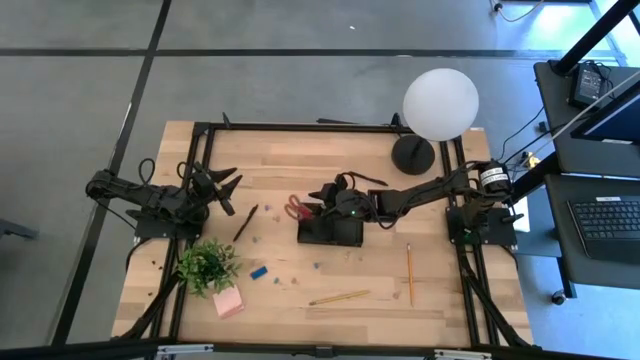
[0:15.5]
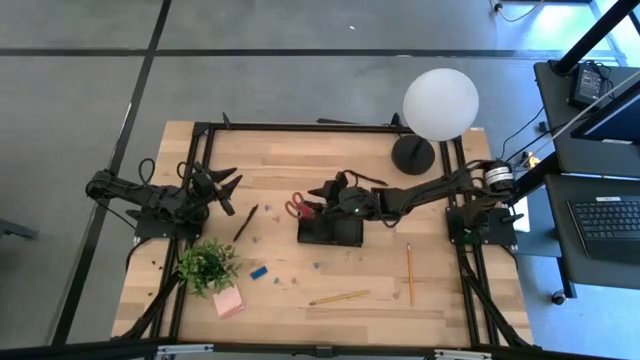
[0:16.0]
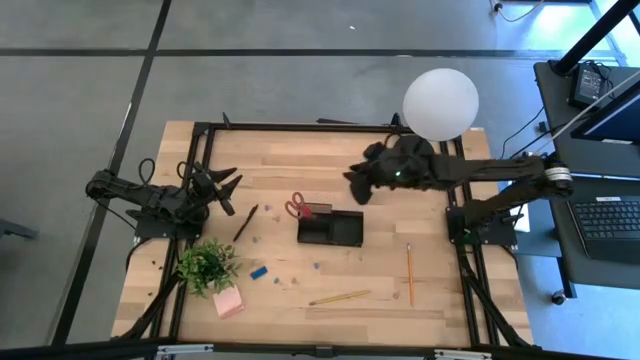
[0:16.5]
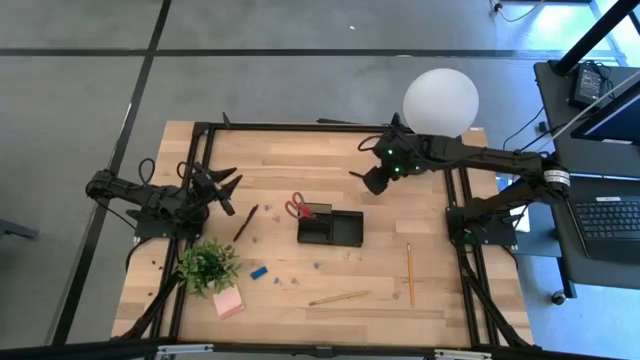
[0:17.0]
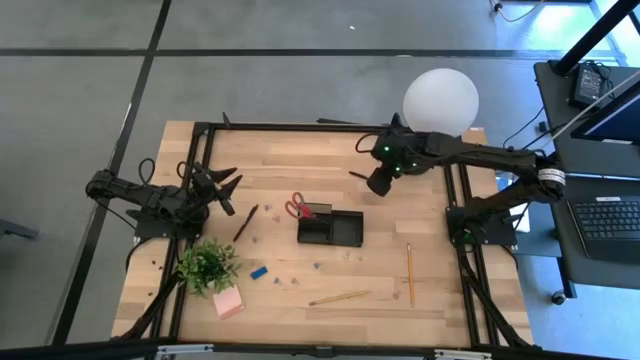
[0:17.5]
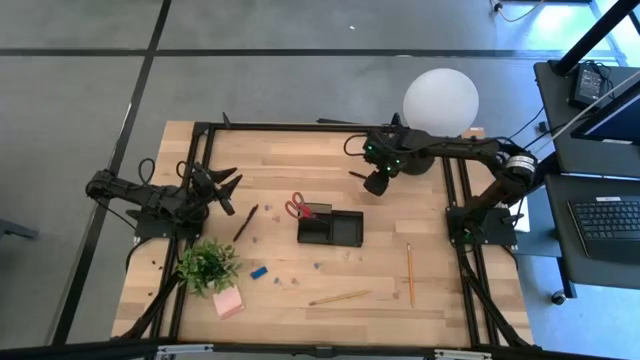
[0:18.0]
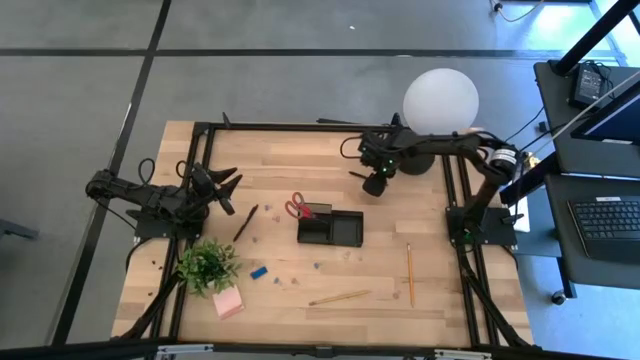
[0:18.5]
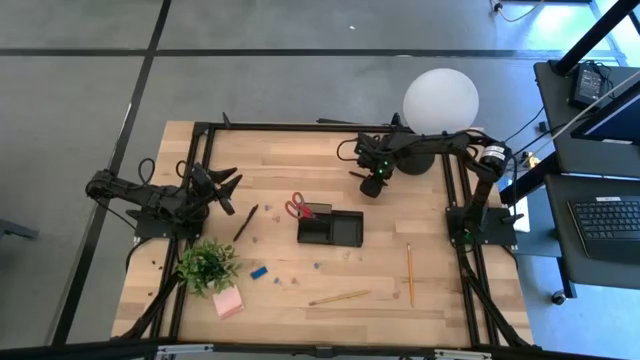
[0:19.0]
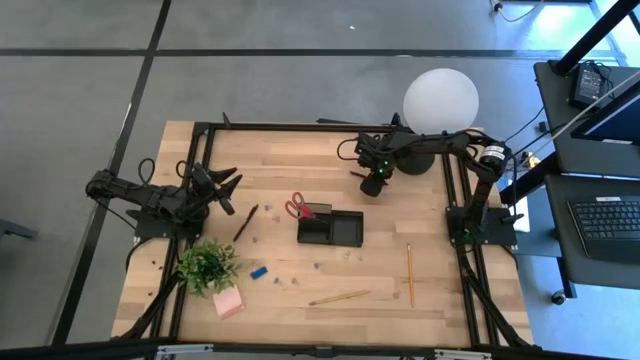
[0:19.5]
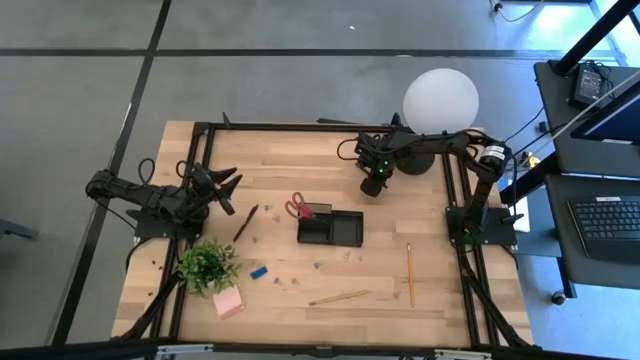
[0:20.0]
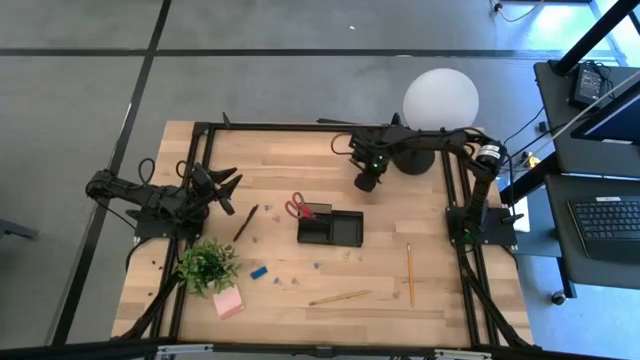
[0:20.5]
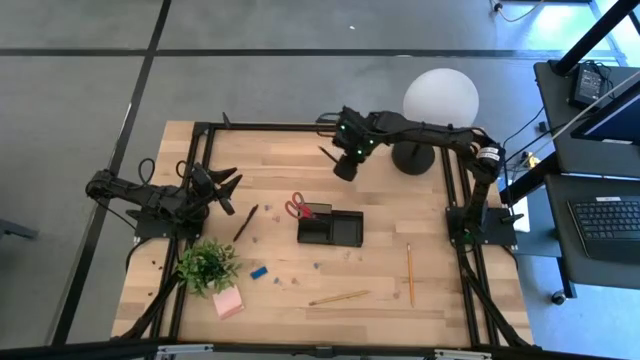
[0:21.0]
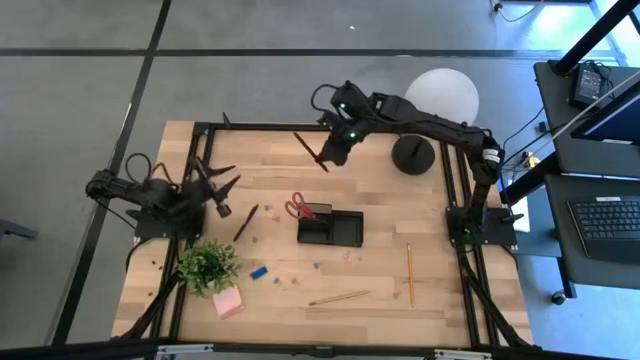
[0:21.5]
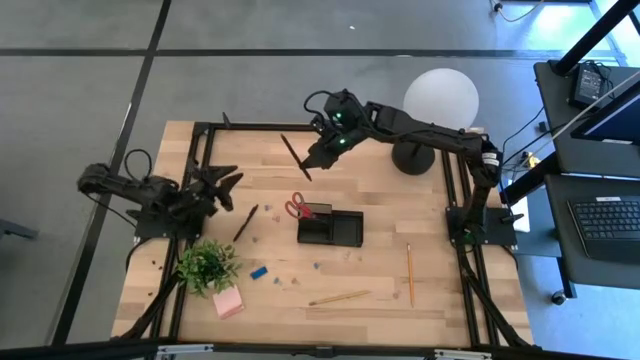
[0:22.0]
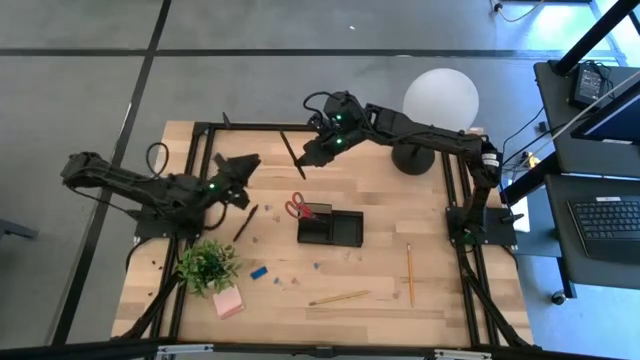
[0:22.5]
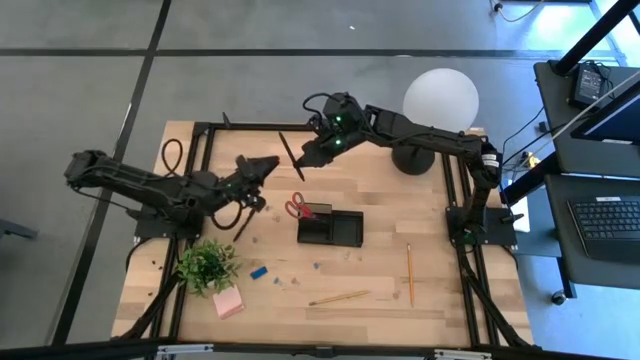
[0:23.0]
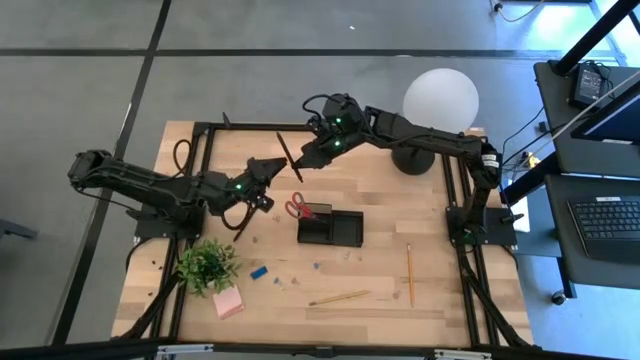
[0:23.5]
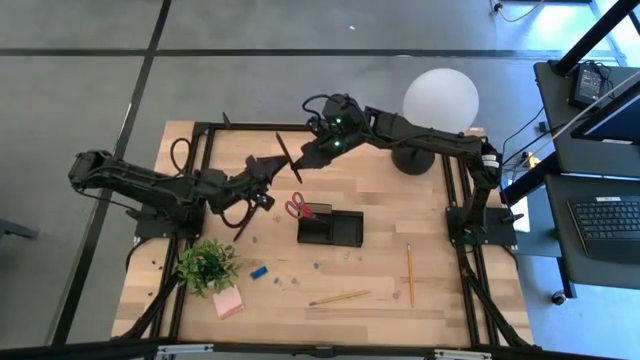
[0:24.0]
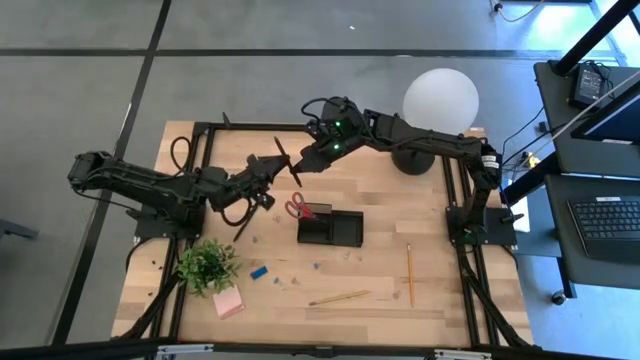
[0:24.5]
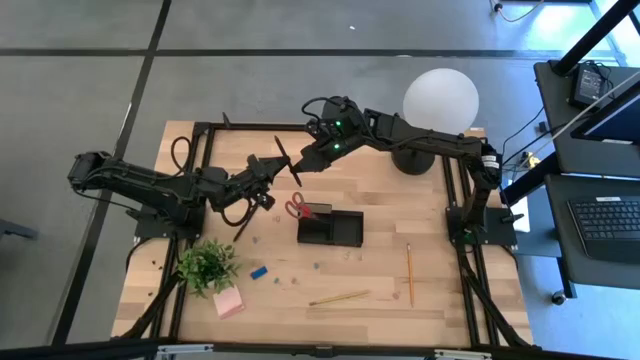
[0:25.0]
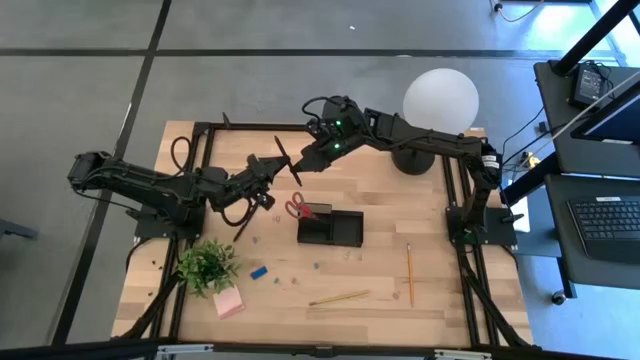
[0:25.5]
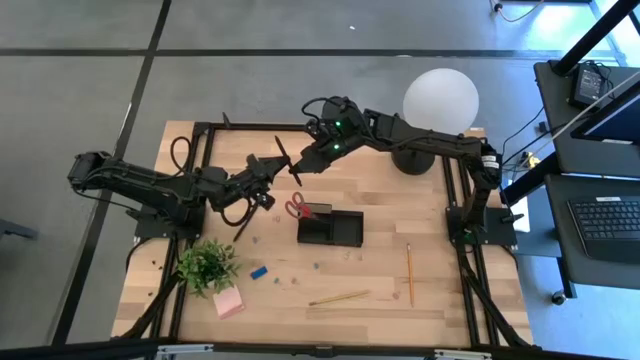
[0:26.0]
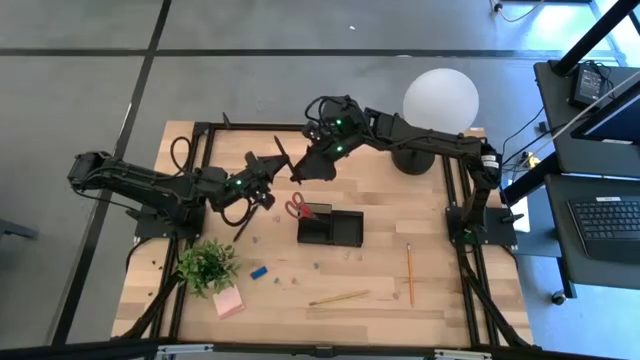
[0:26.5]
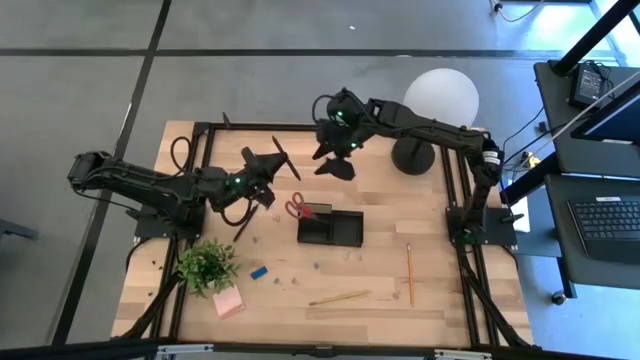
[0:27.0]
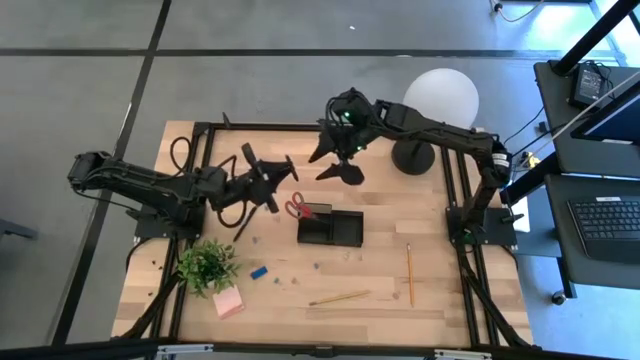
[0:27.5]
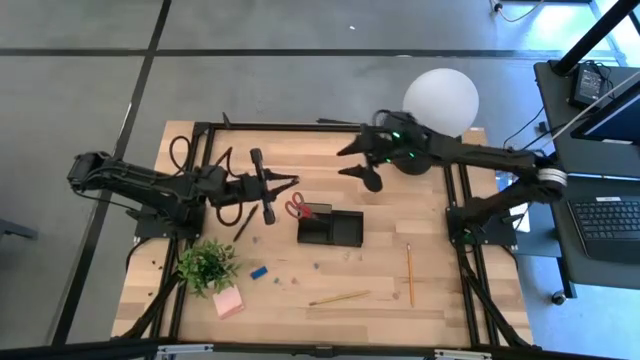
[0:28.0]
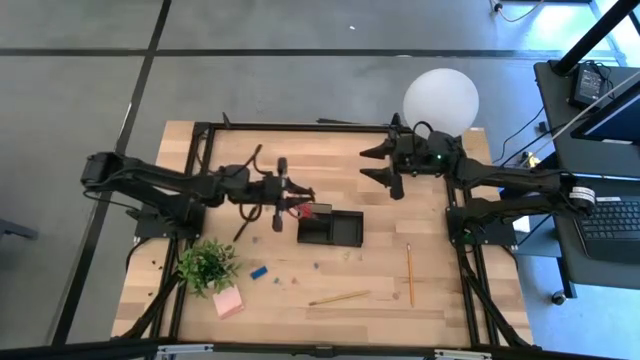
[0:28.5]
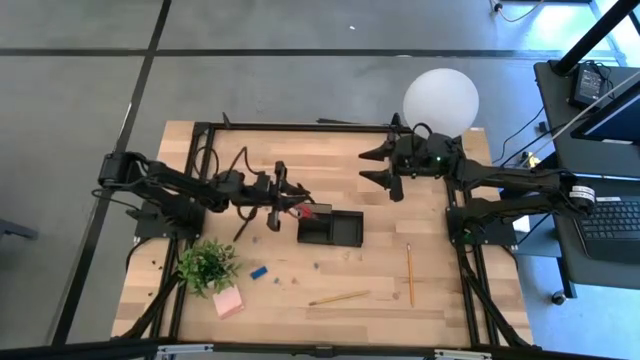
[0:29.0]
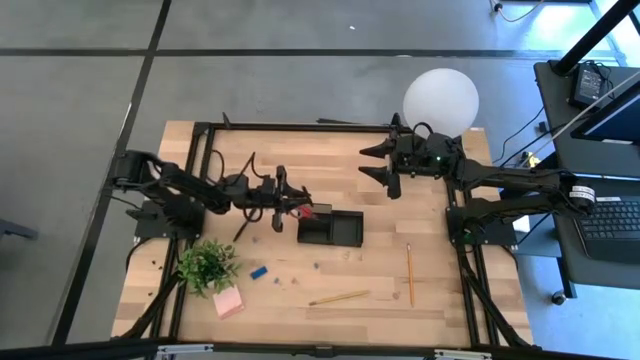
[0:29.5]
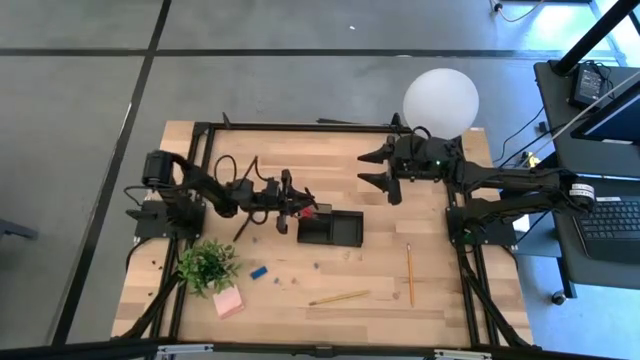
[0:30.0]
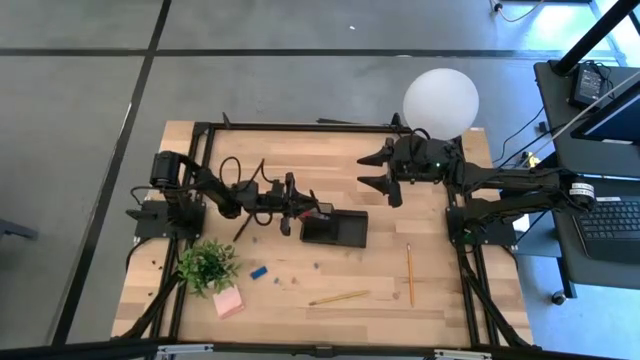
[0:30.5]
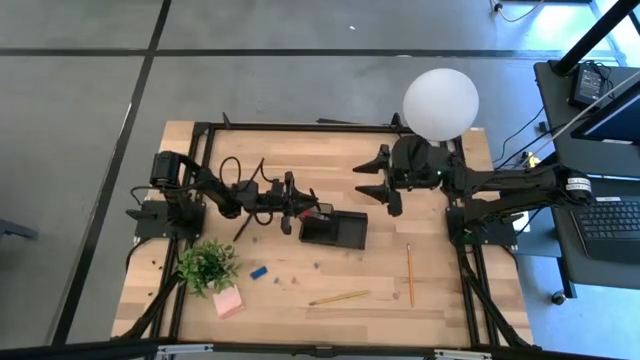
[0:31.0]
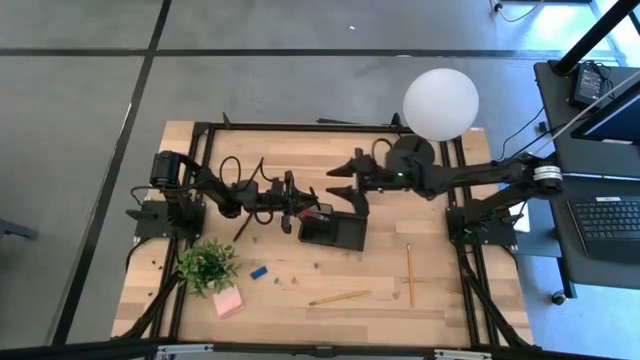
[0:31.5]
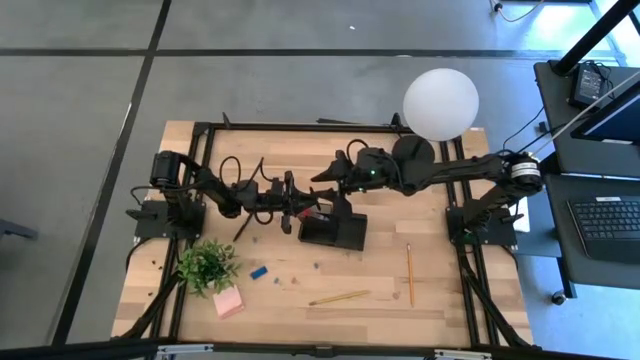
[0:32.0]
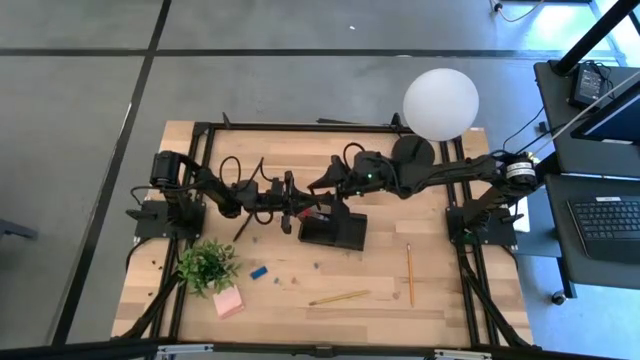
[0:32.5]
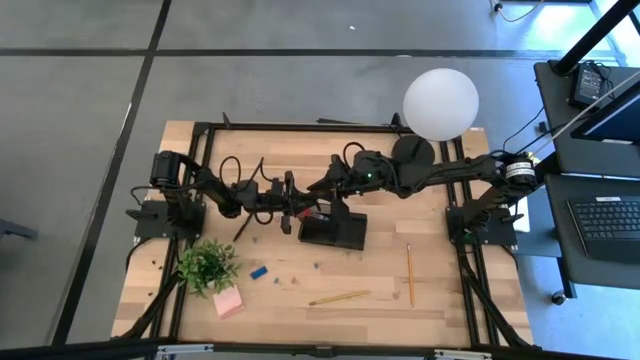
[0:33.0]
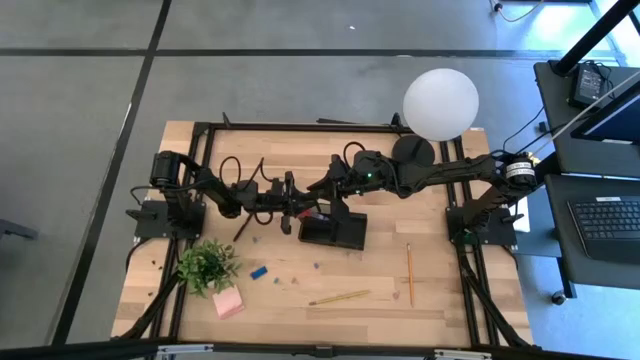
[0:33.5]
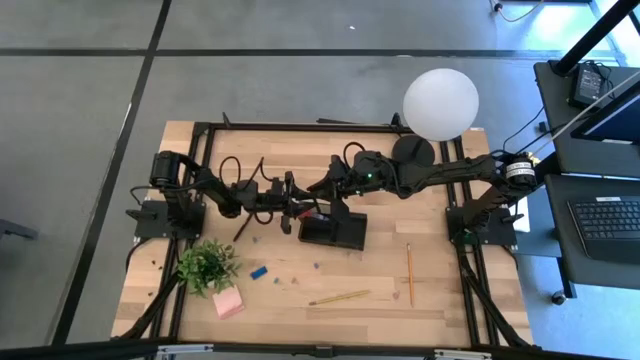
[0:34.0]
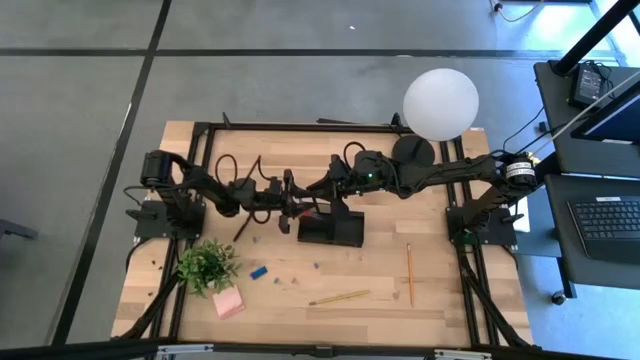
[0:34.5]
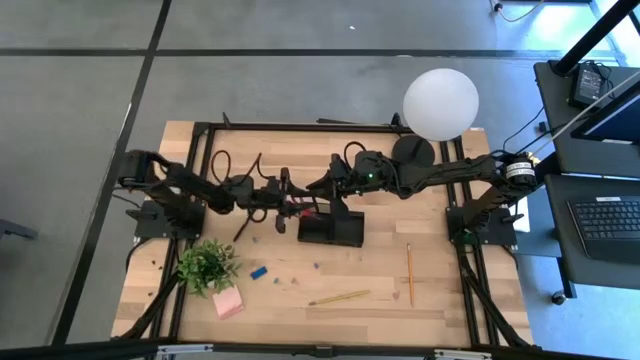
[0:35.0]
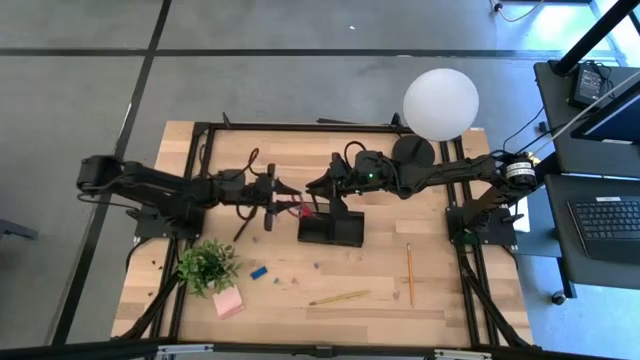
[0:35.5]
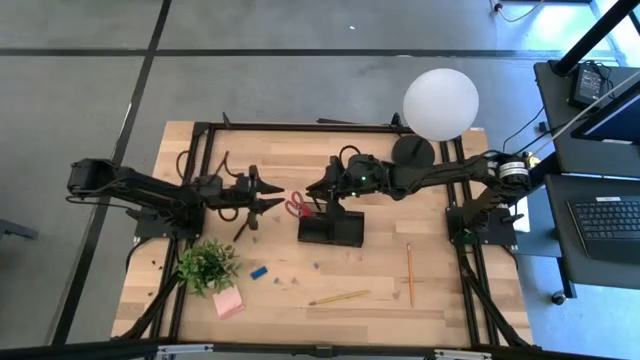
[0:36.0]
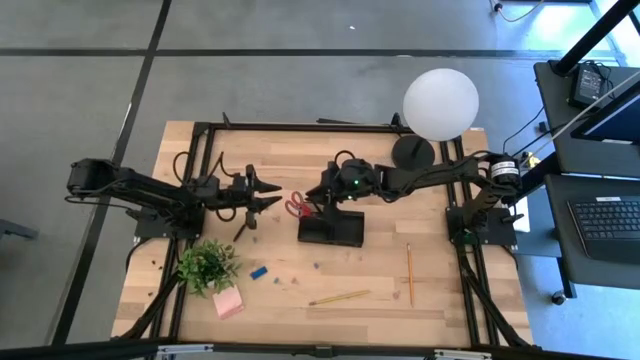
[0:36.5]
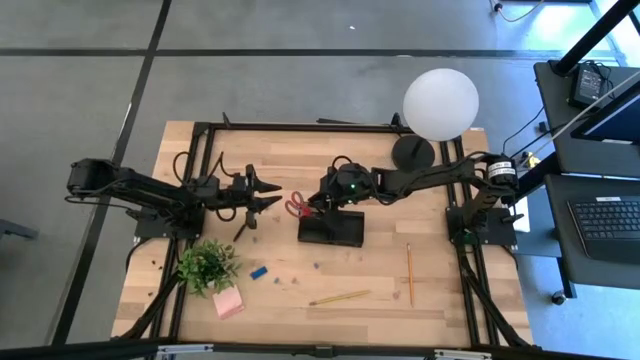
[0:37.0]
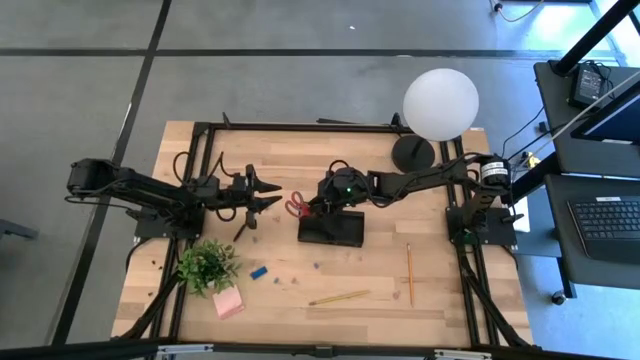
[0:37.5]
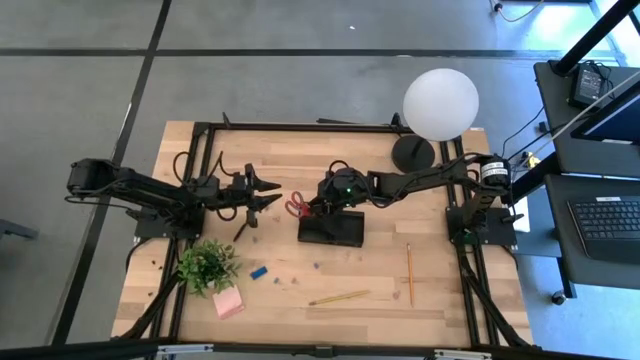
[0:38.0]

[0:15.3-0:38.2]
Task: Pick and place office supplies into organizer
Put the black pen into the black desk organizer
